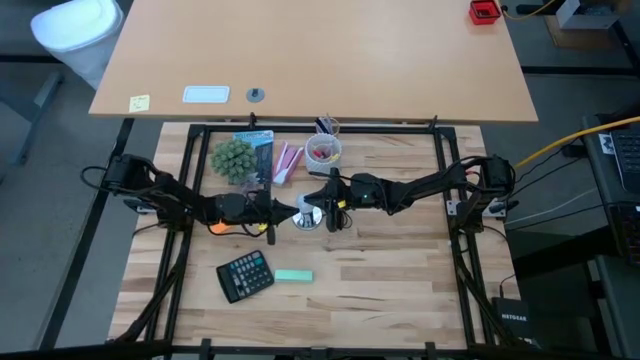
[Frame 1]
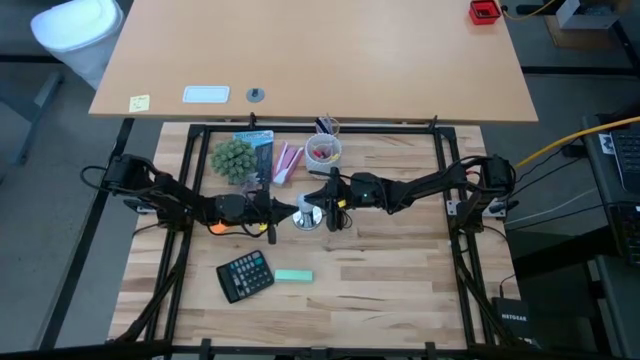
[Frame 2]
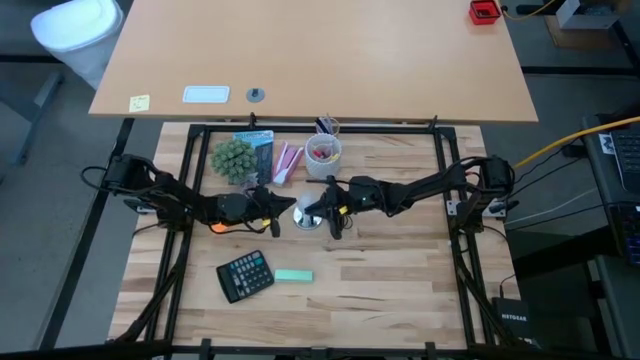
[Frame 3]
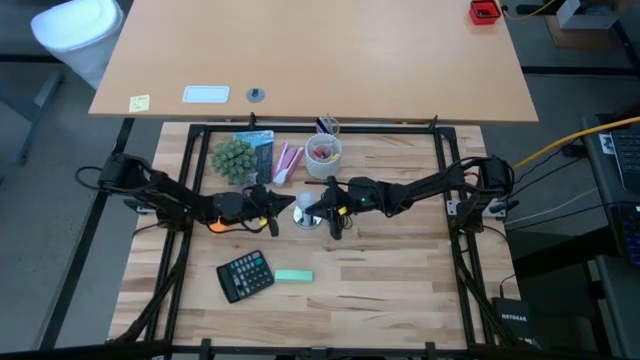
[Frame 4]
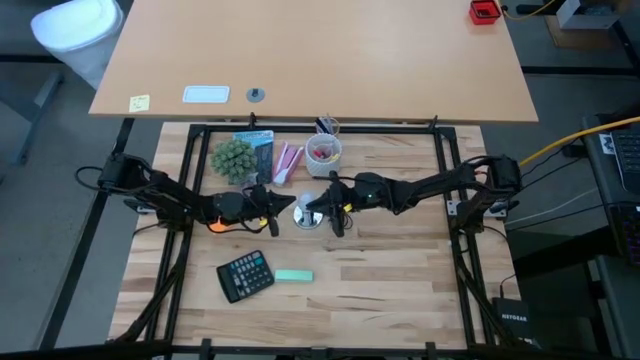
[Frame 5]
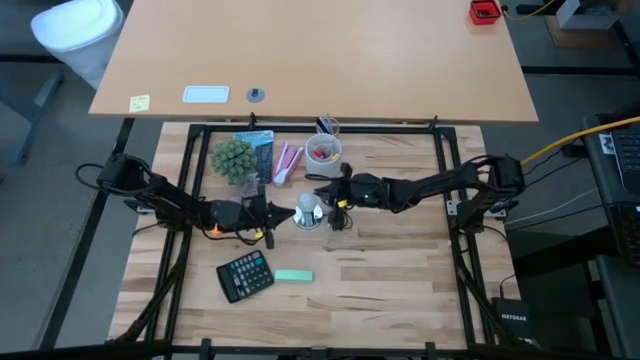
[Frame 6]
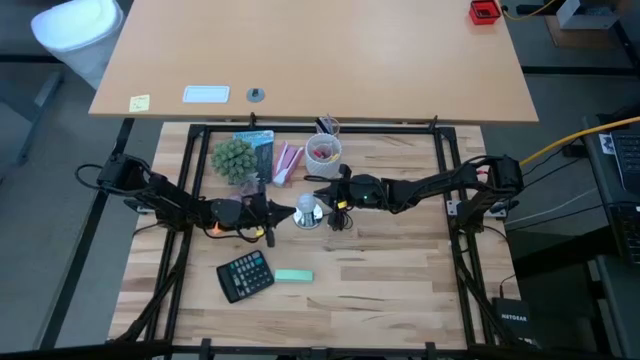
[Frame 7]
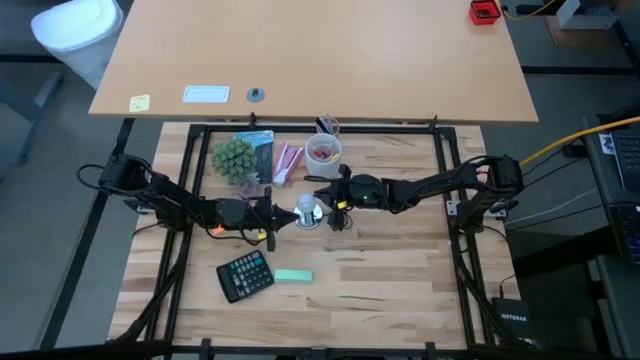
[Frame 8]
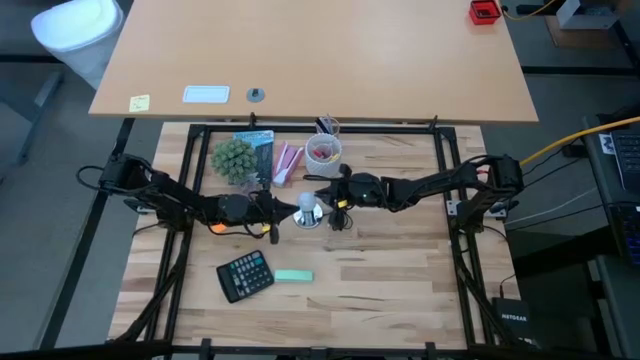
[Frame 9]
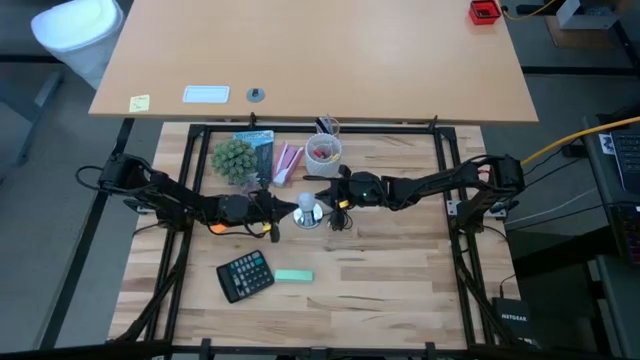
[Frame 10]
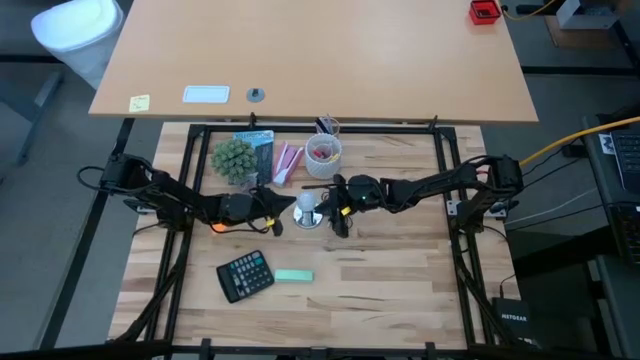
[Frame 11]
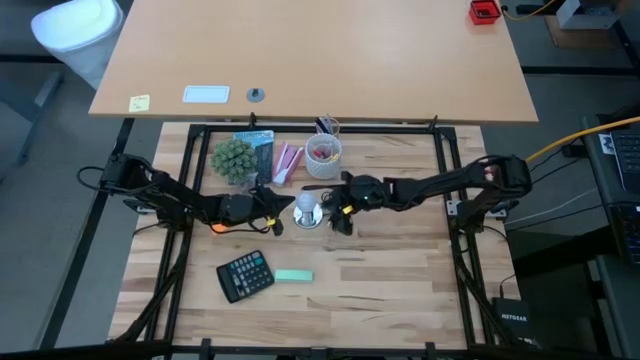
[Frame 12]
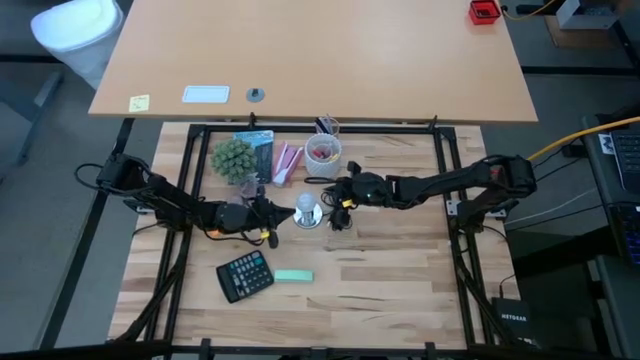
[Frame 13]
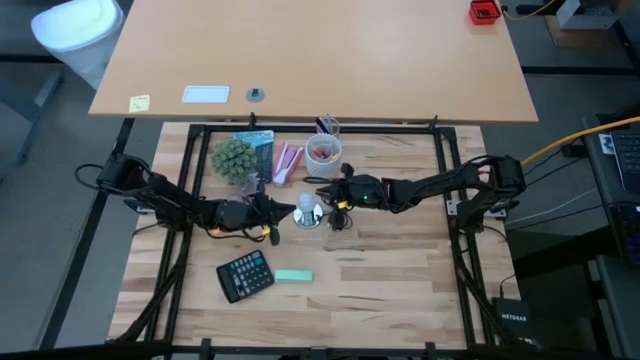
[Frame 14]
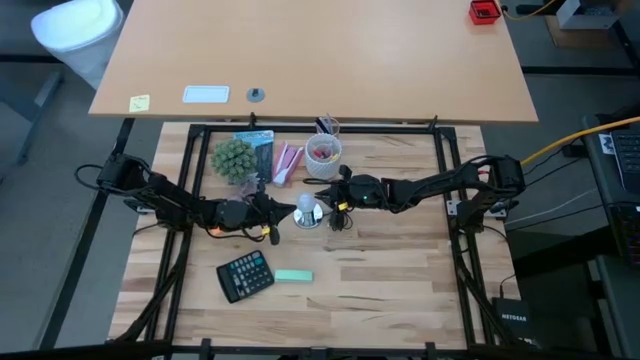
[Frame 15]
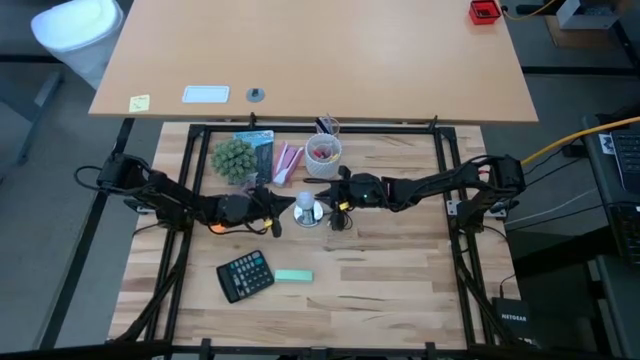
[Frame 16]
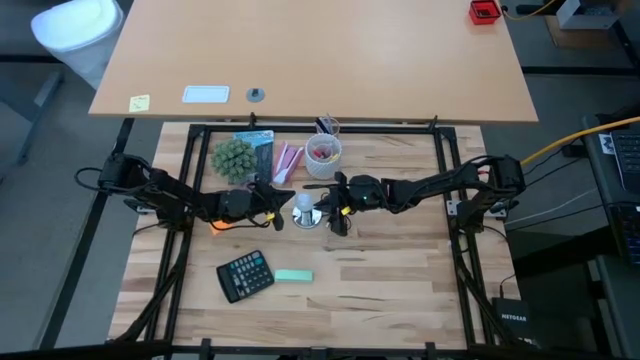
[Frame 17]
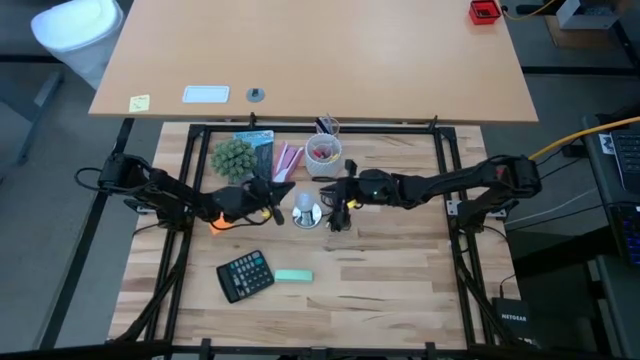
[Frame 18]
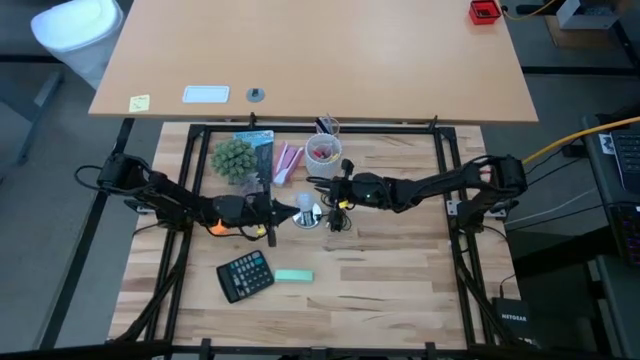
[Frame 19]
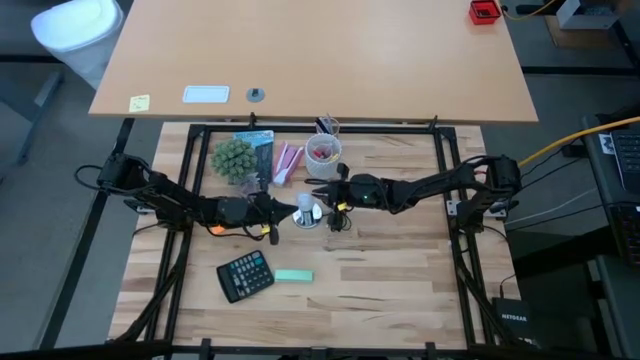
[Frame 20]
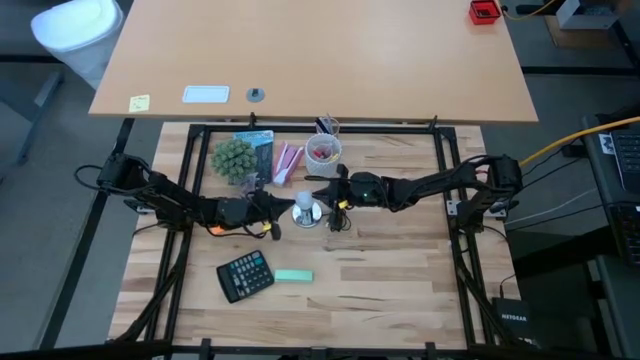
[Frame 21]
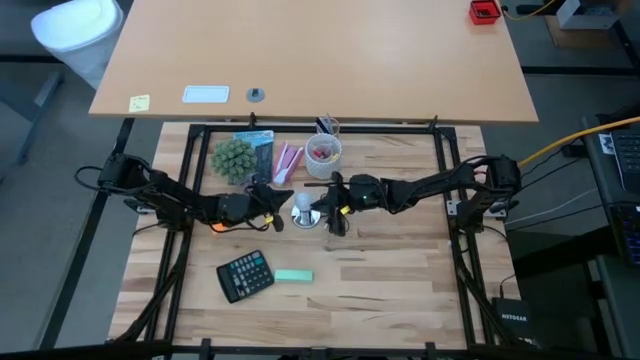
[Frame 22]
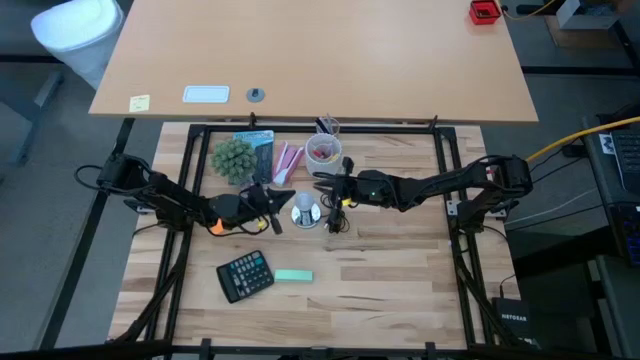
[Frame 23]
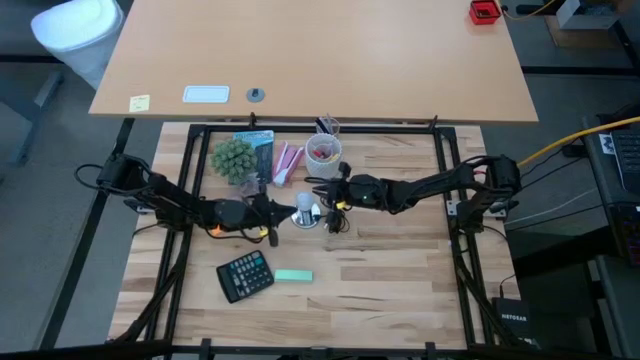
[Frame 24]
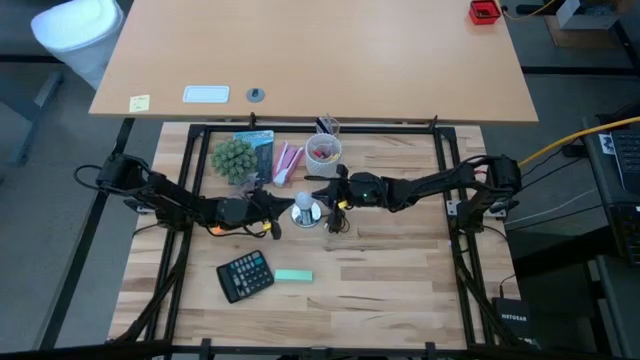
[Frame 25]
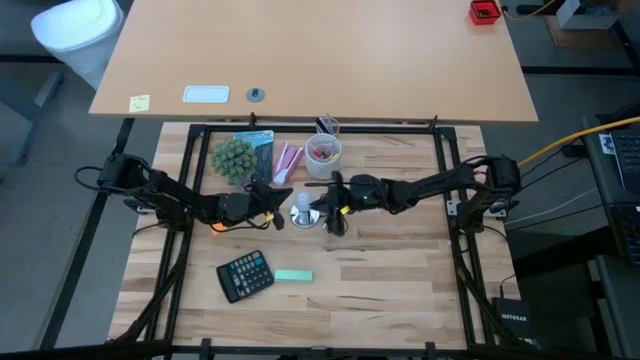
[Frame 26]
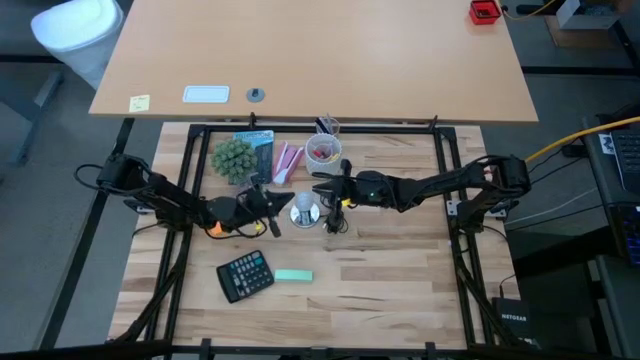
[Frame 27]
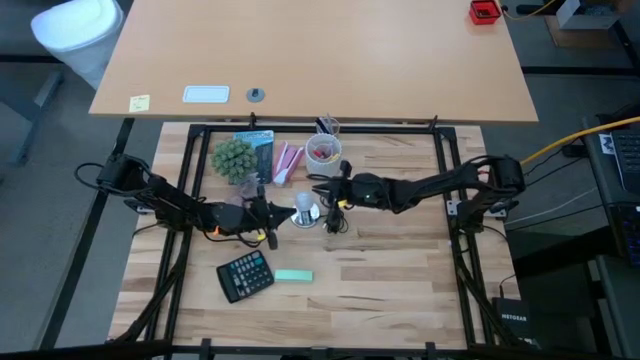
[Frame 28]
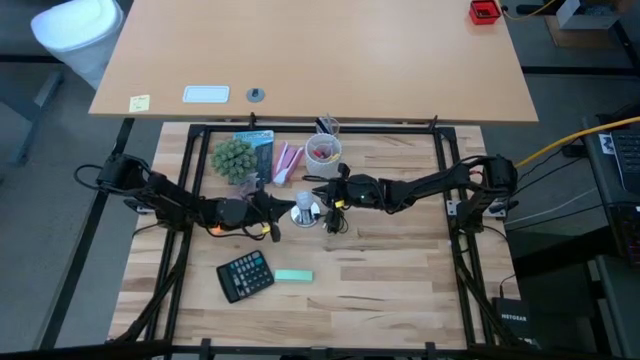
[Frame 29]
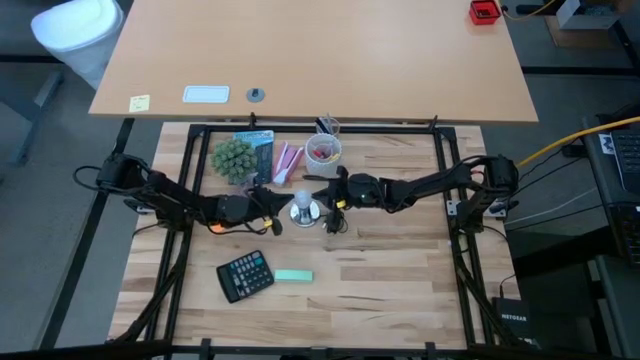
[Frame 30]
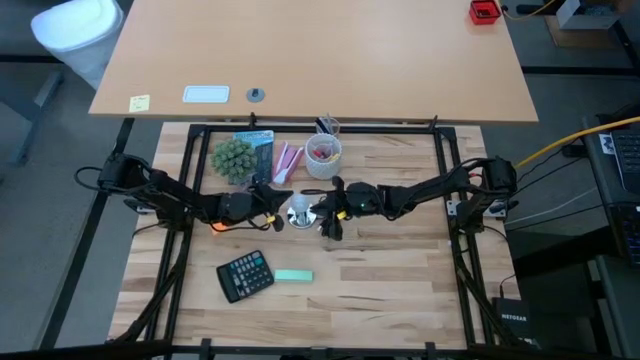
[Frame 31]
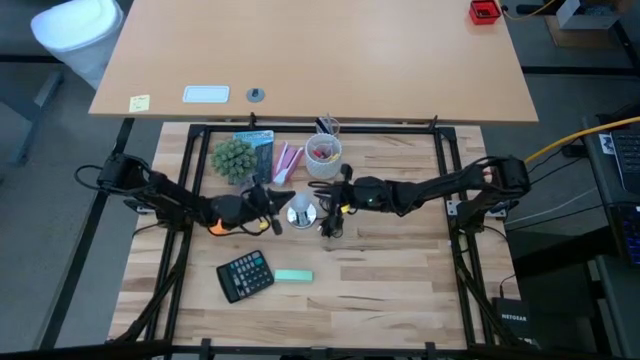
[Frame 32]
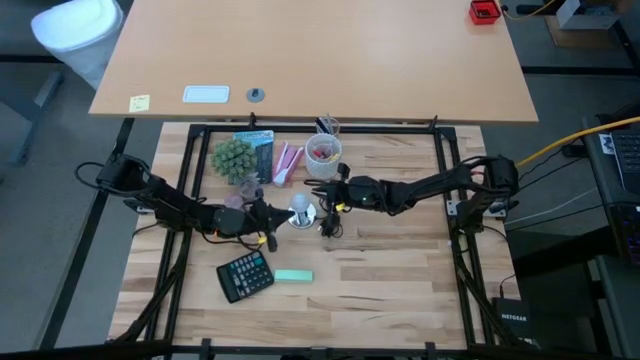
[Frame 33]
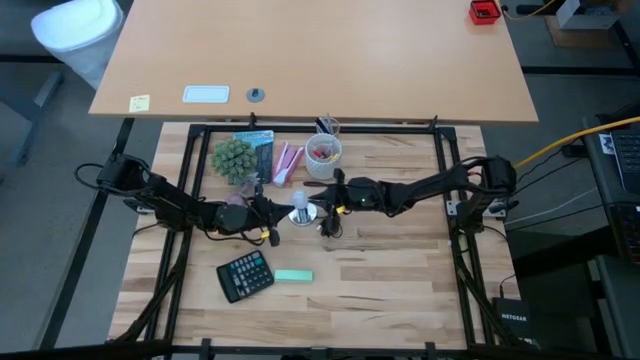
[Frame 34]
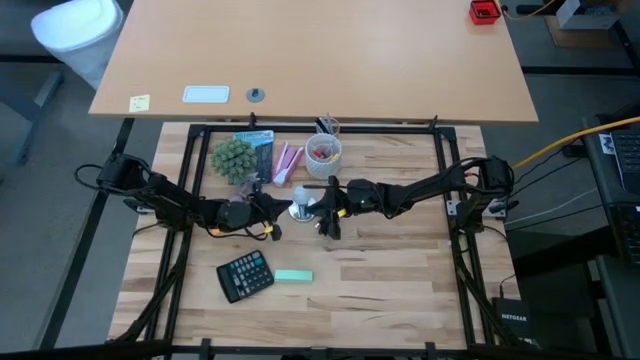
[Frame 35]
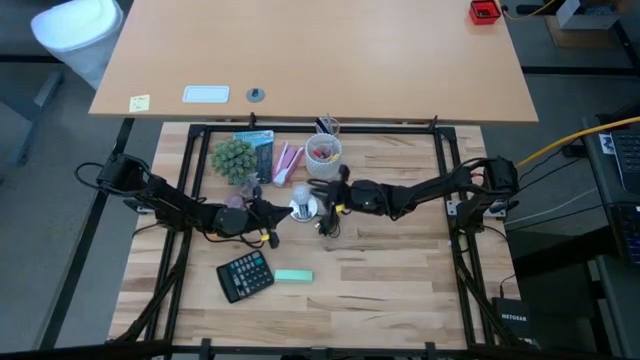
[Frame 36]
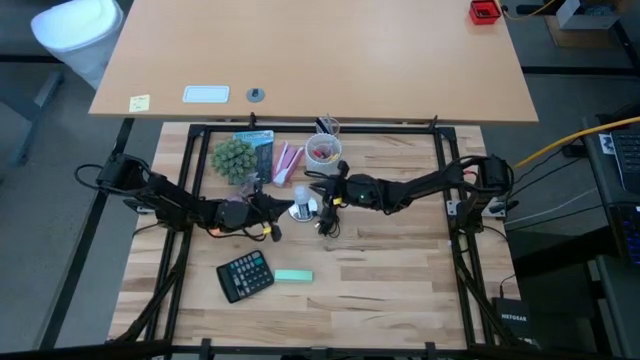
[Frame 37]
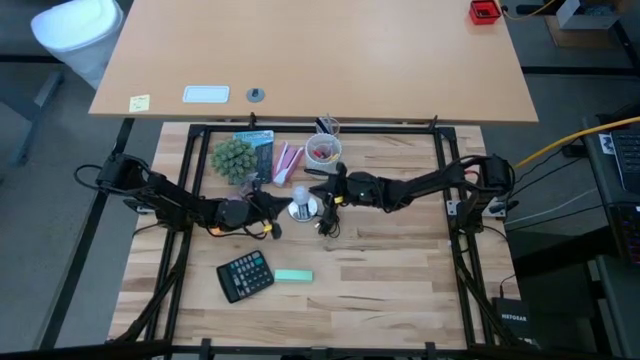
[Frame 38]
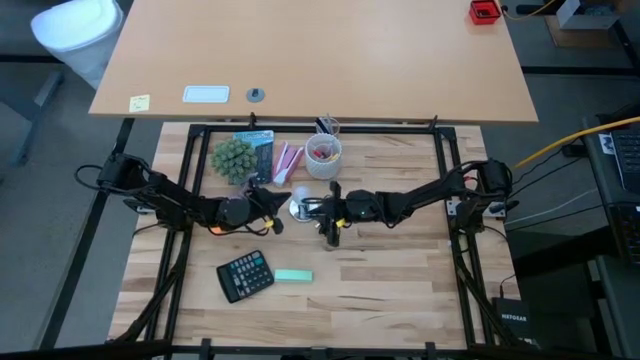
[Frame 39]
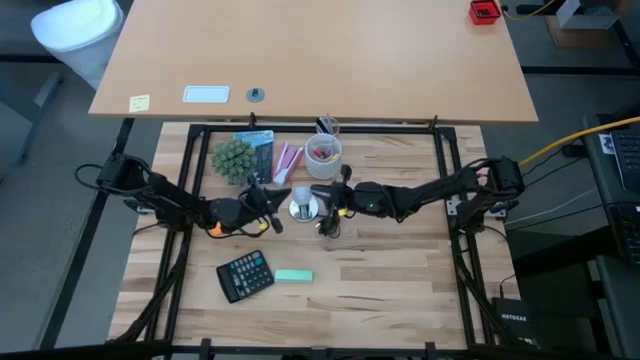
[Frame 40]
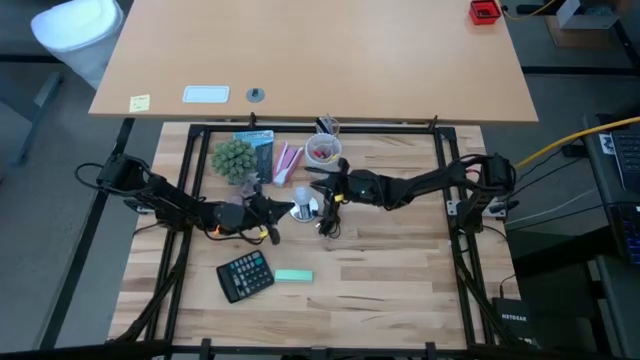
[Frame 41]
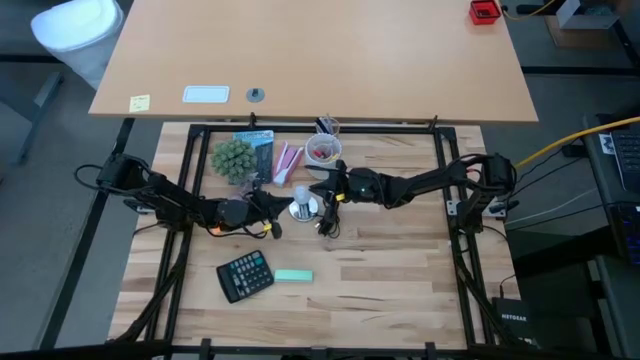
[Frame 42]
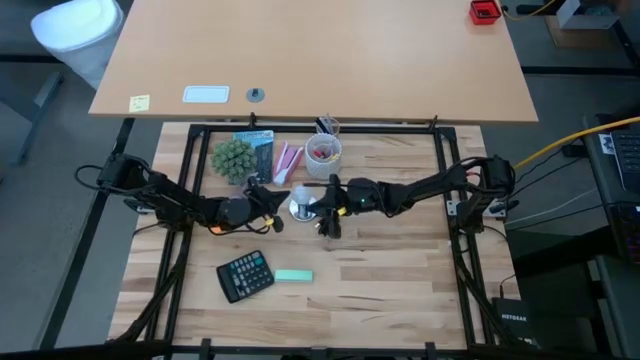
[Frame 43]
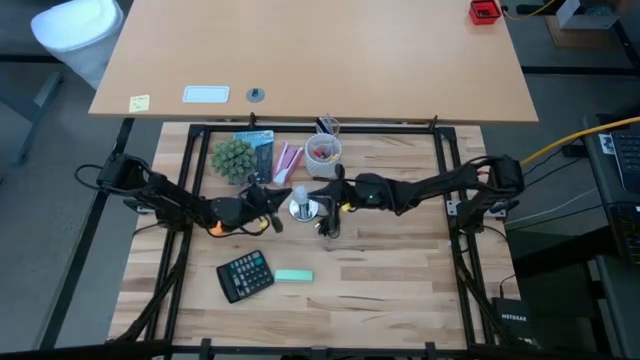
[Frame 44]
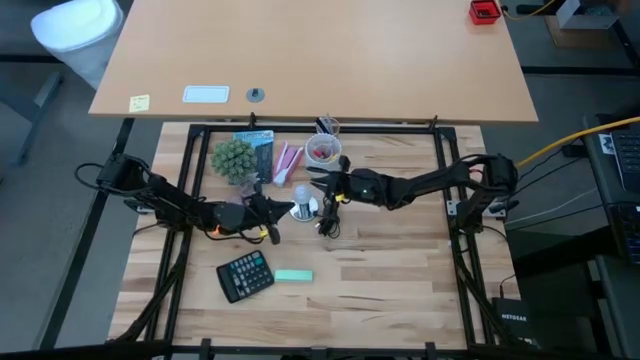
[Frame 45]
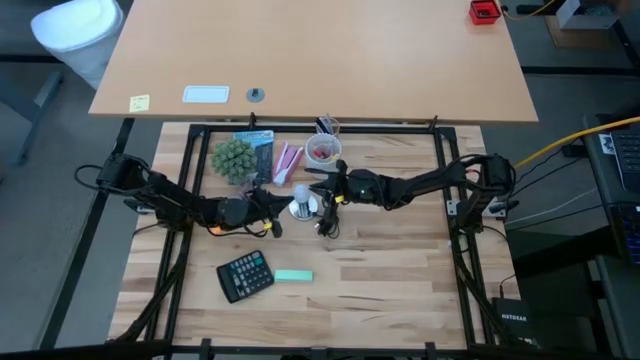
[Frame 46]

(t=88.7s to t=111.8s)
Task: Screw lightbulb
Insert the lightbulb into the lamp
